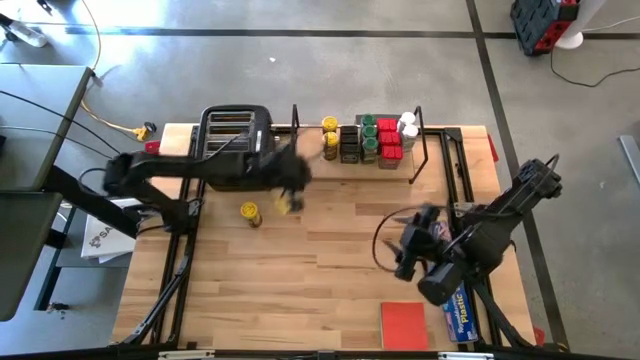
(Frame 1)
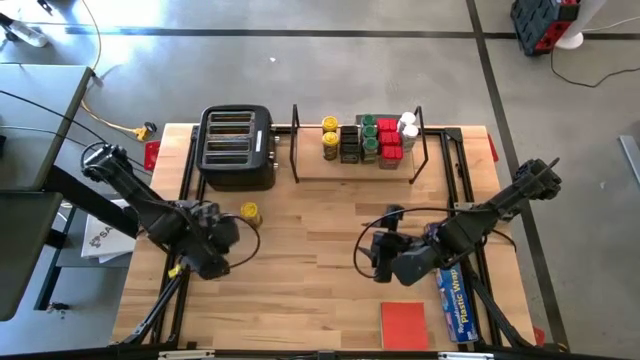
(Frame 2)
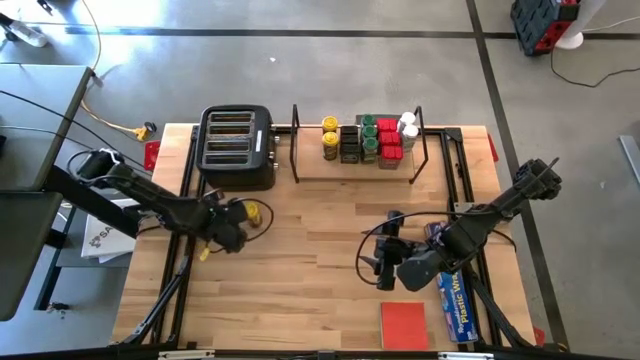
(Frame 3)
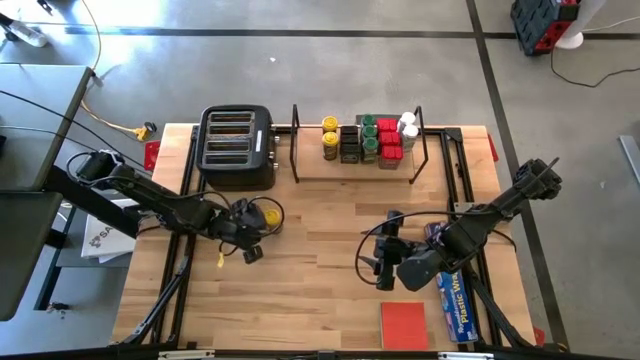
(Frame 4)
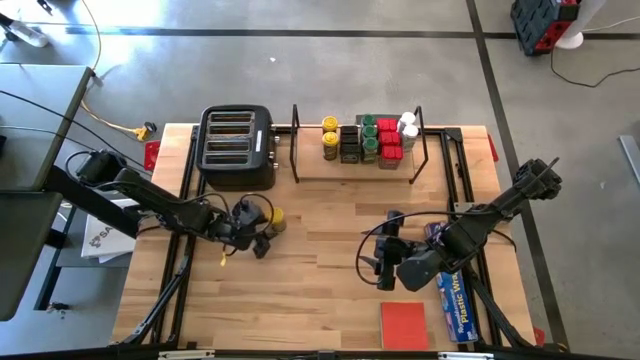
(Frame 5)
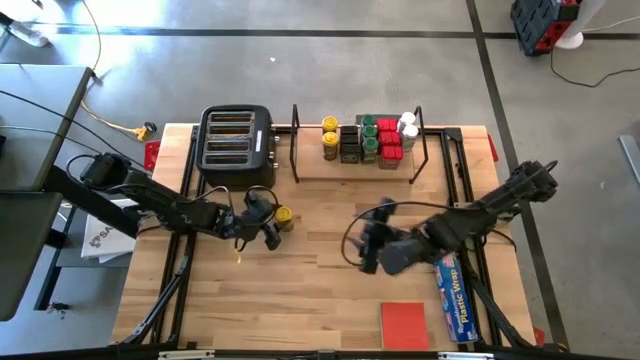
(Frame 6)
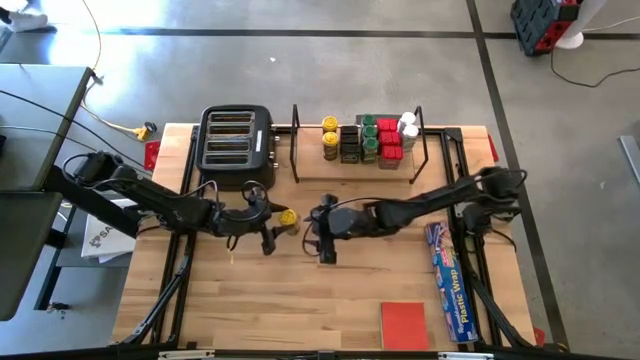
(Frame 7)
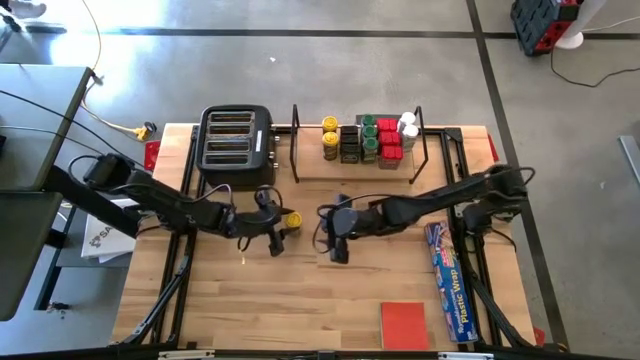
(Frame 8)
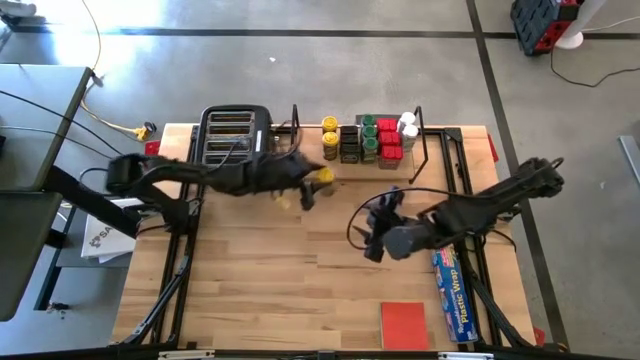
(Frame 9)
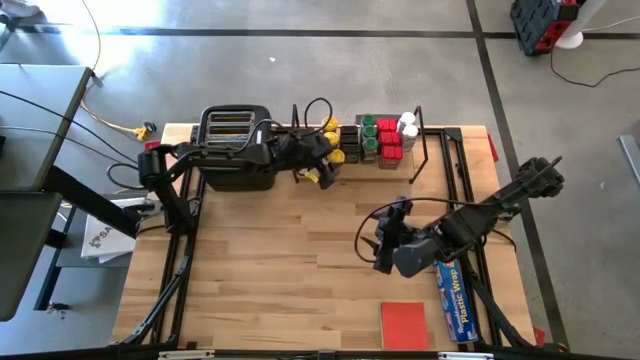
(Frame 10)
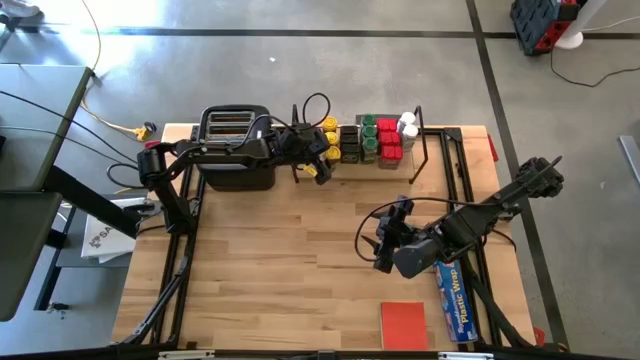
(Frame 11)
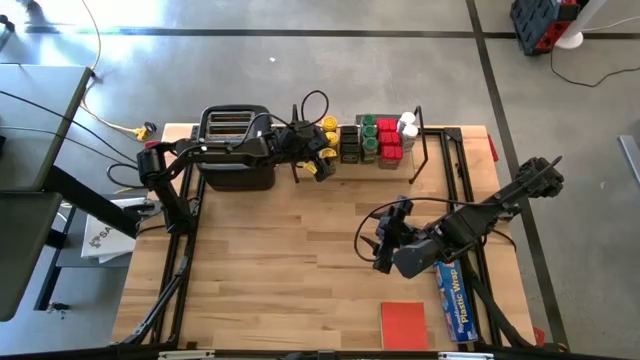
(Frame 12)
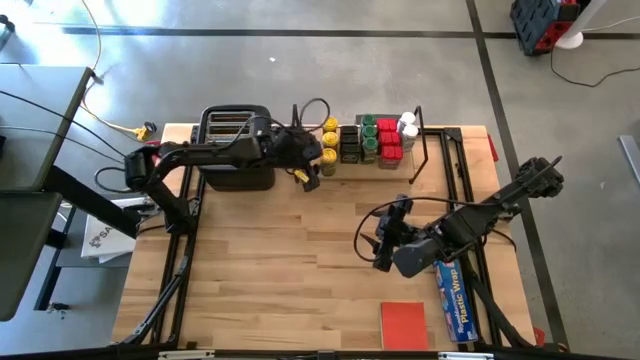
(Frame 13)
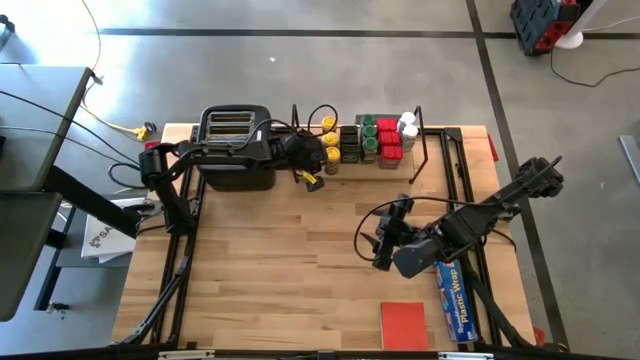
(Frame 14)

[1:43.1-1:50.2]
Task: Shelf spices
Put the yellow seasoning bottle on the shelf aligned with the other seasoning bottles

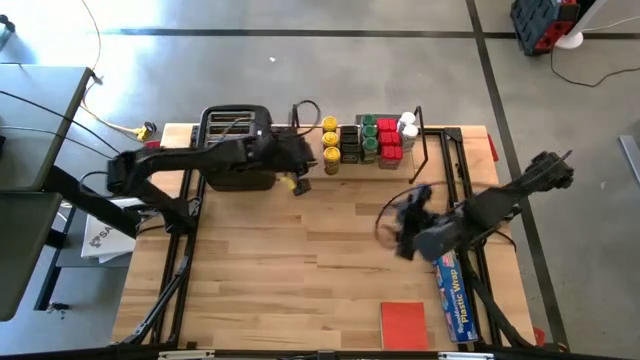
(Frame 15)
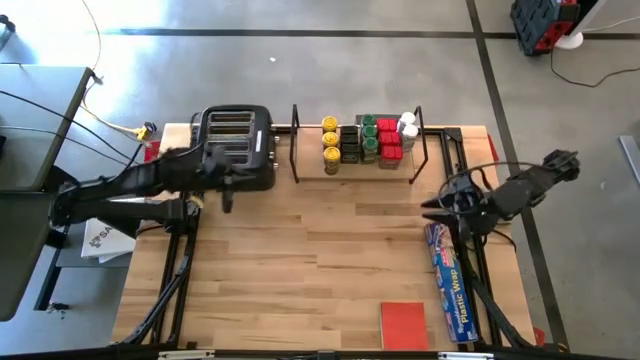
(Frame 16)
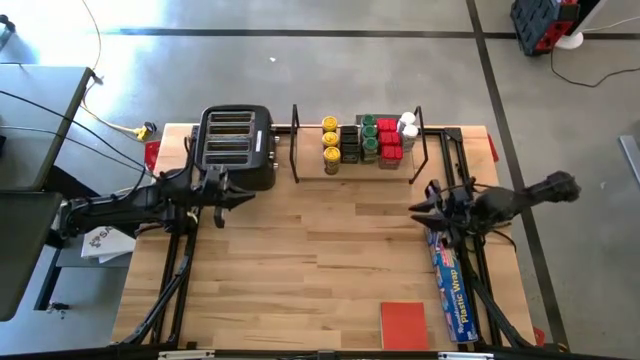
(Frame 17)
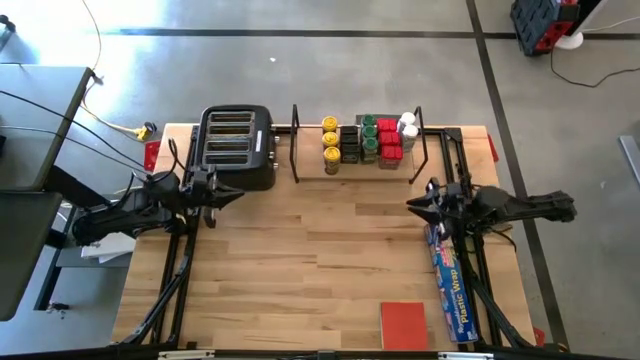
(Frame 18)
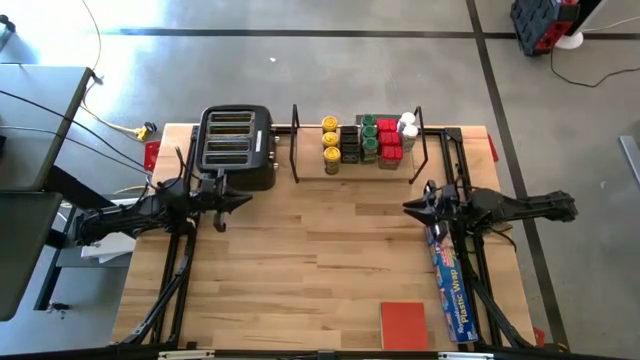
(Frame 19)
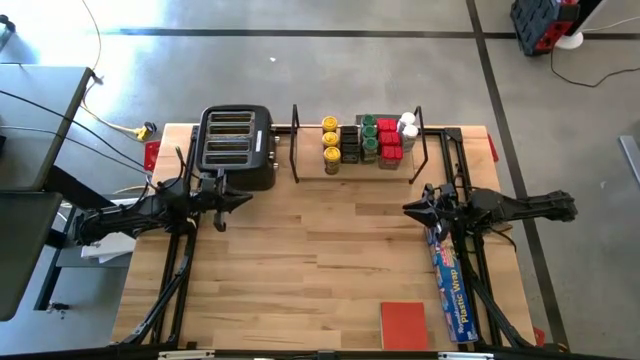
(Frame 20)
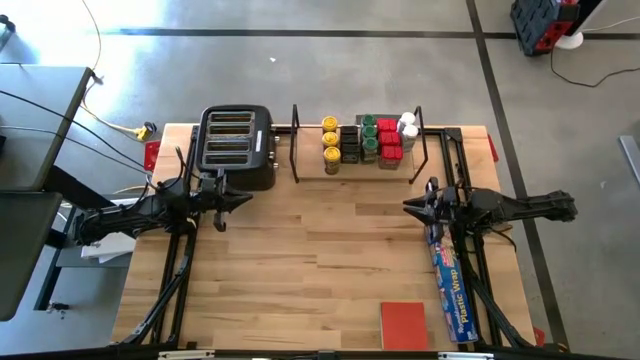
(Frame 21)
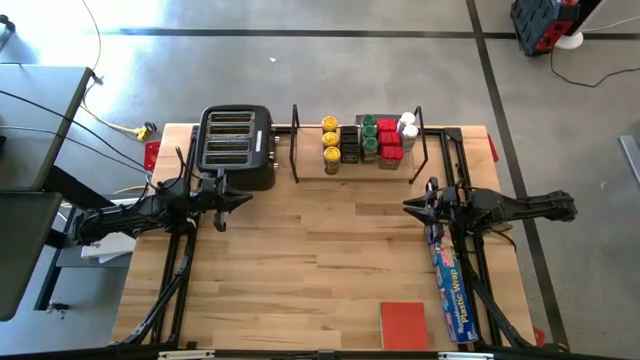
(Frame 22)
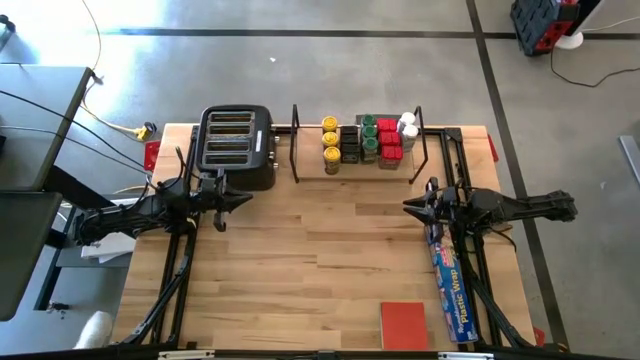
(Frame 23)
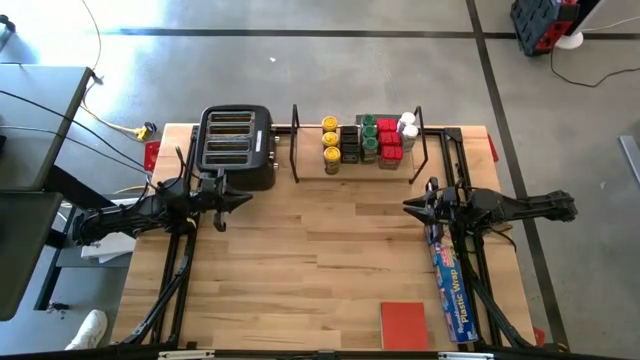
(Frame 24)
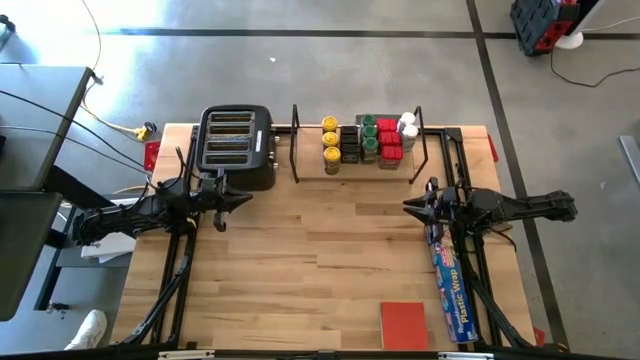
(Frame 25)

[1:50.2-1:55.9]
Return to Home Position

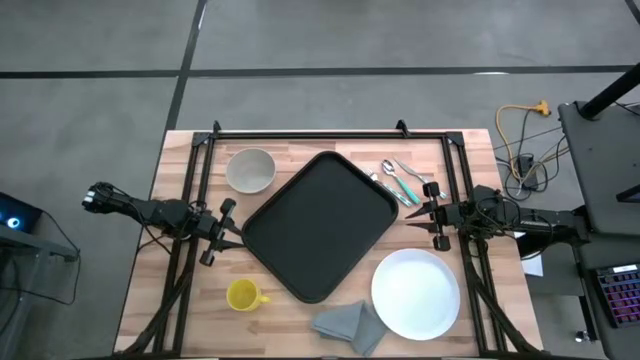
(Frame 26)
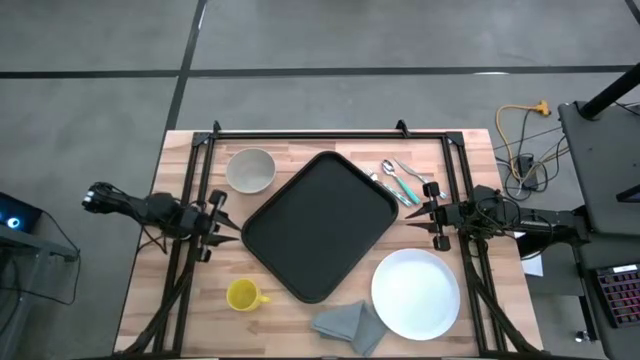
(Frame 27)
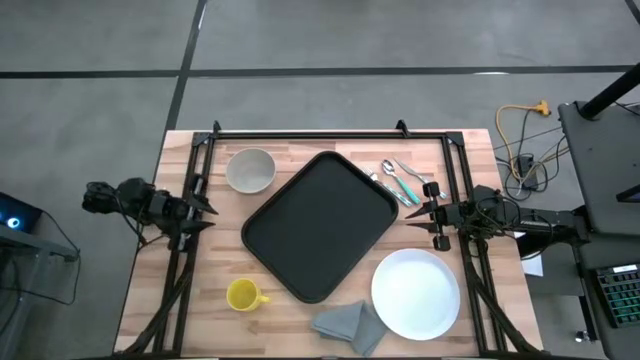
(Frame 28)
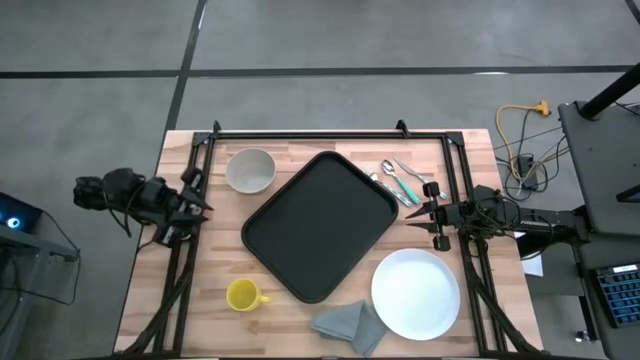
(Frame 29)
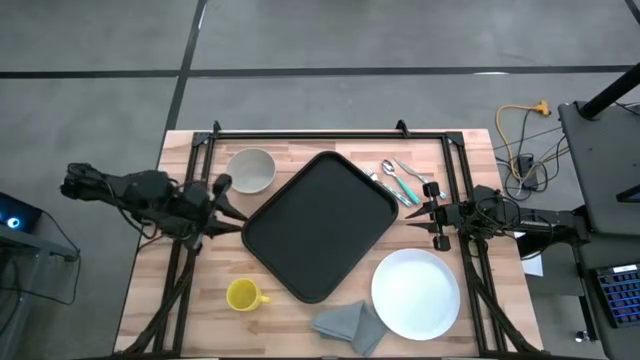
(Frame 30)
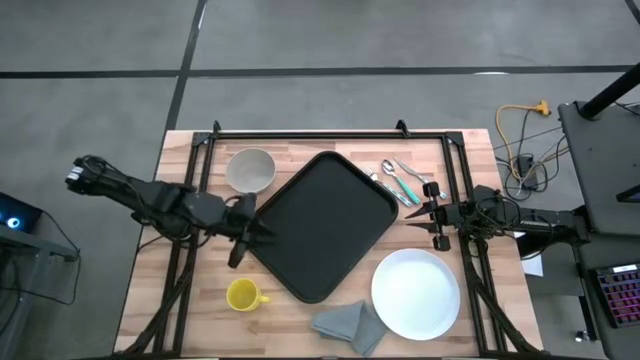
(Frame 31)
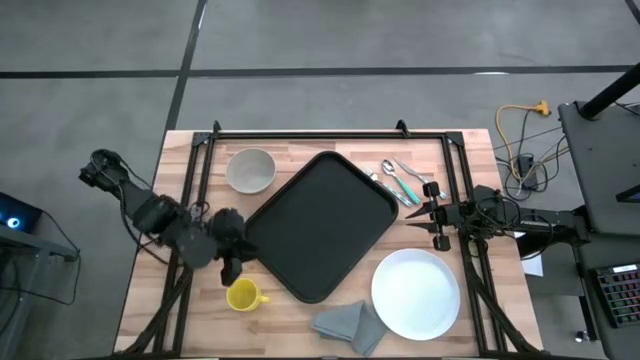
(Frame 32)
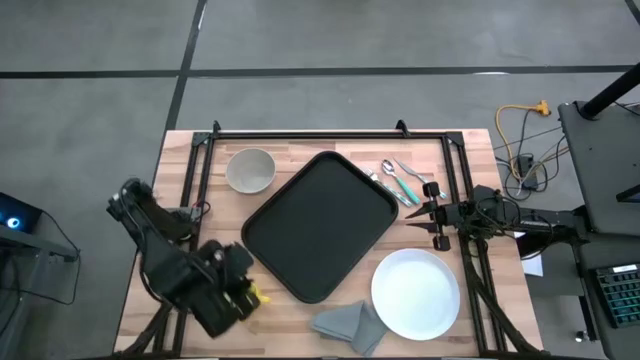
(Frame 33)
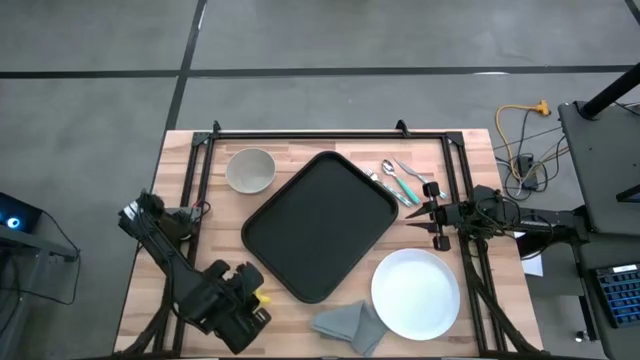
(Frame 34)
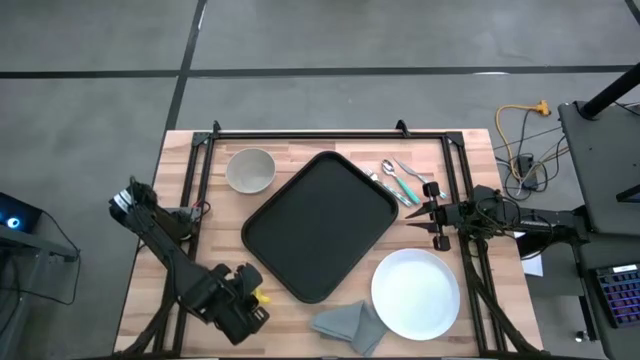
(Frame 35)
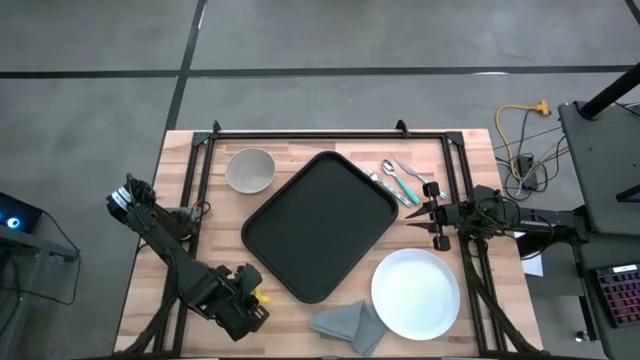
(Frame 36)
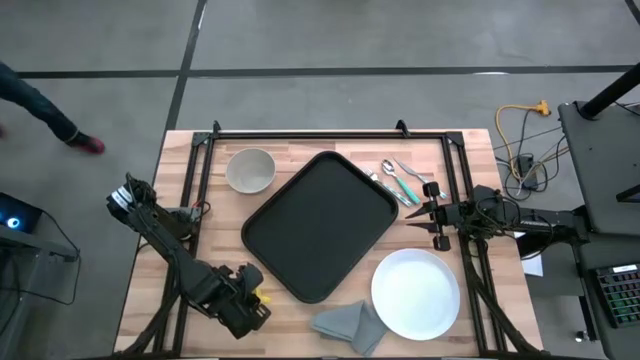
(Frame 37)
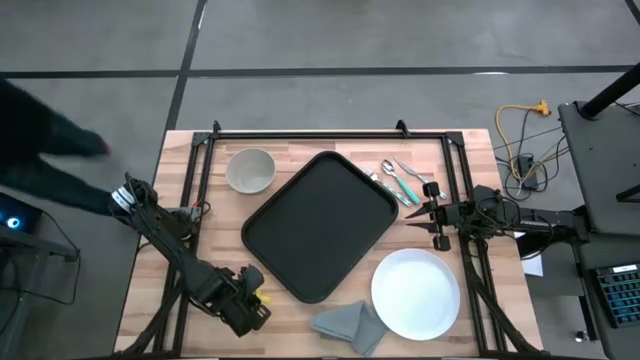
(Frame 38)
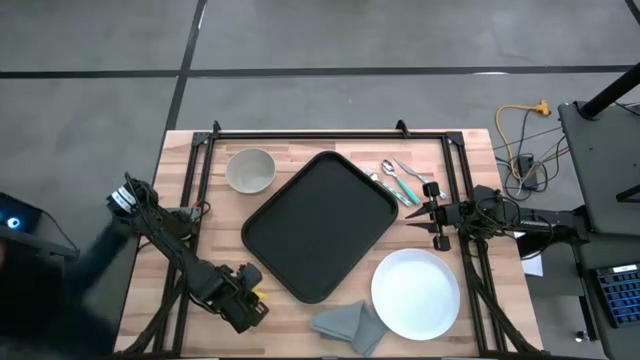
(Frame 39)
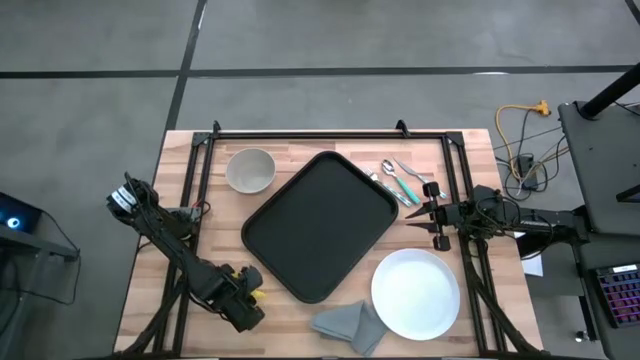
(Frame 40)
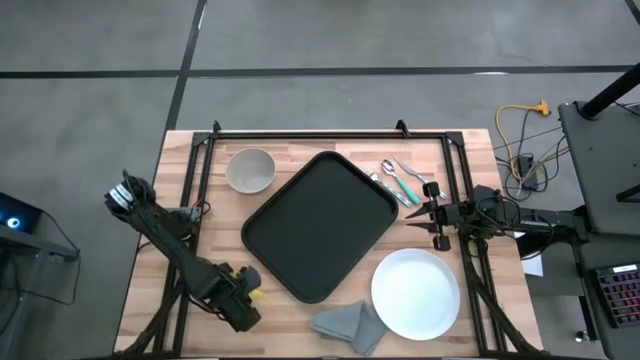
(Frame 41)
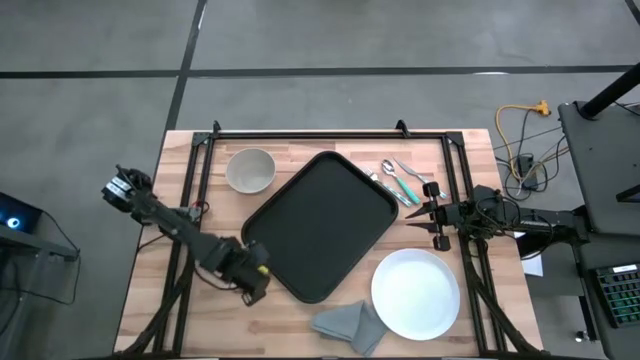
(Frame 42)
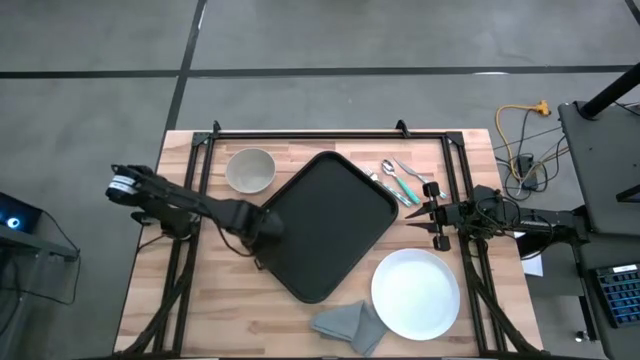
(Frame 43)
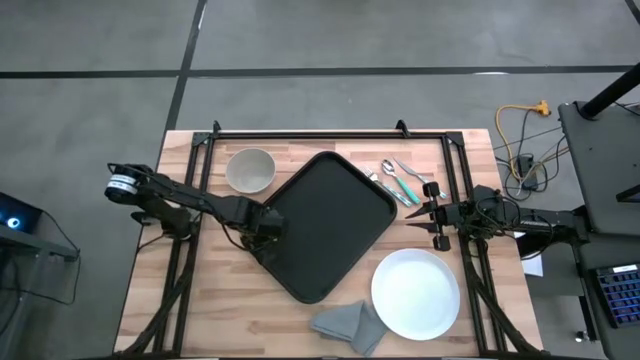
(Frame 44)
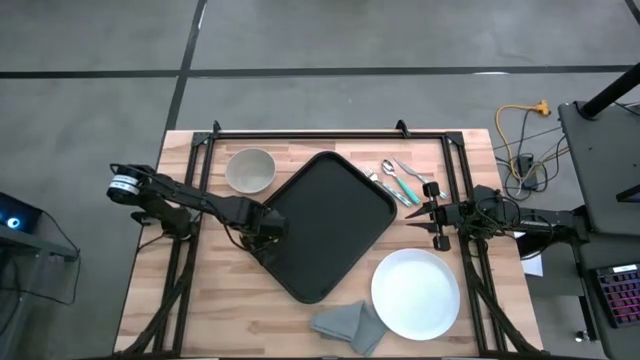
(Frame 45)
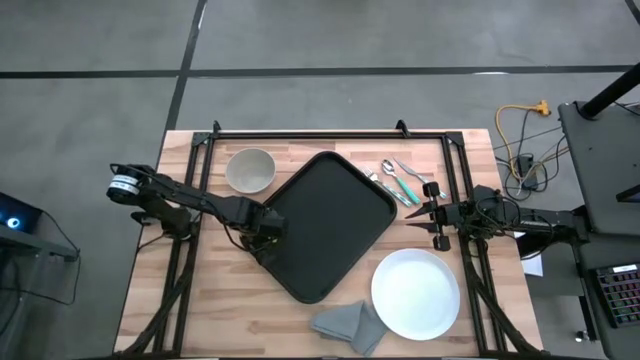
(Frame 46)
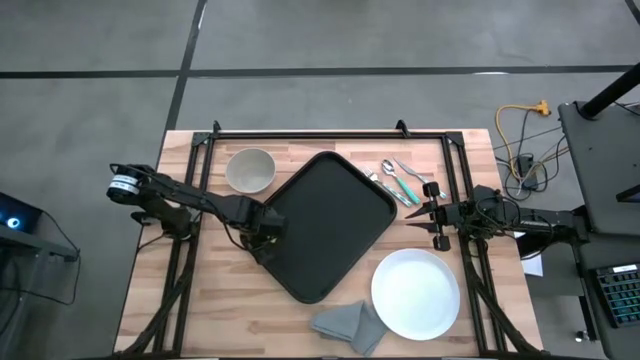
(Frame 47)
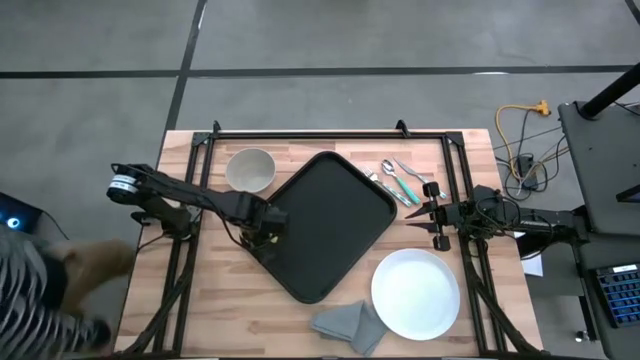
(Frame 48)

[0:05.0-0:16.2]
Task: Set up tray
Put the yellow mug on the black serving tray
